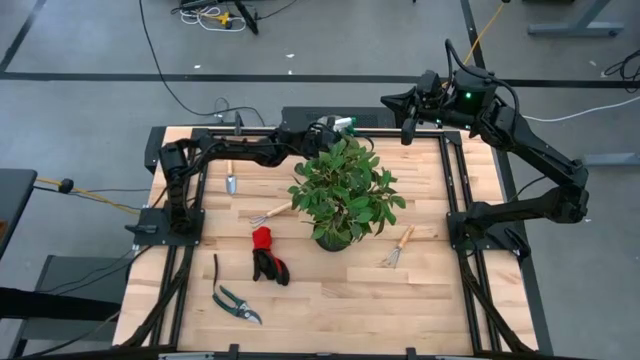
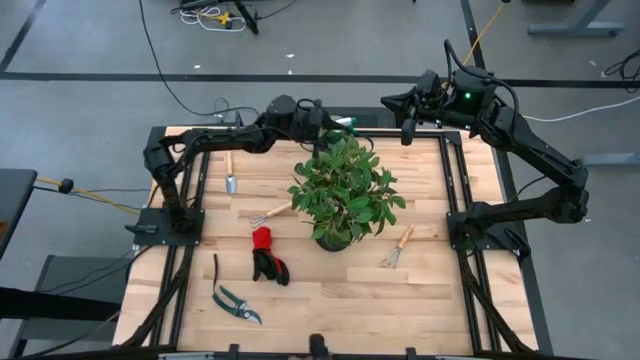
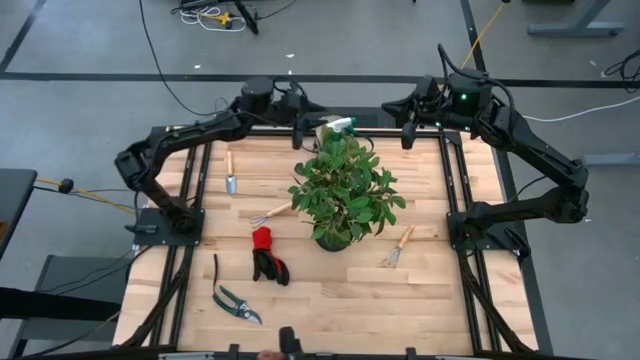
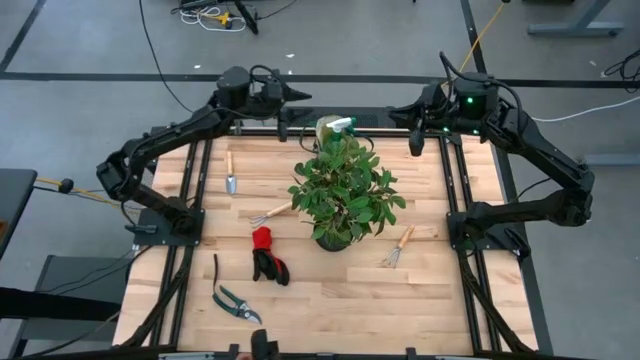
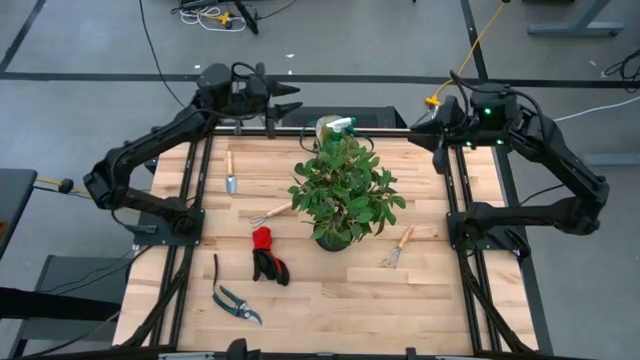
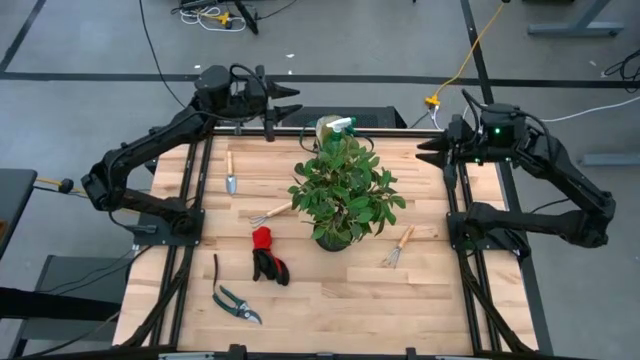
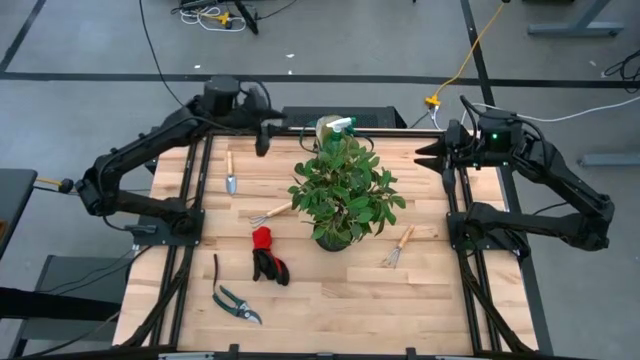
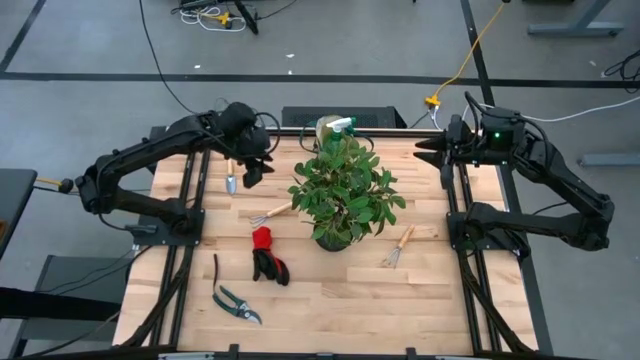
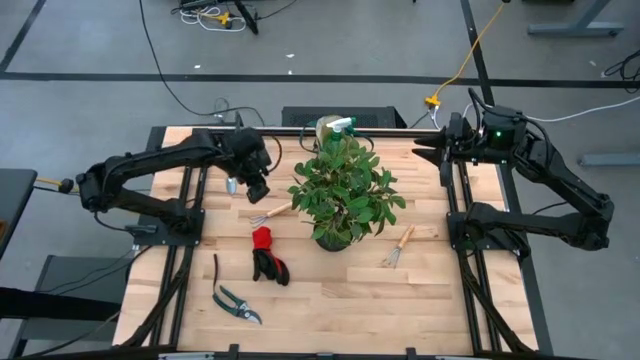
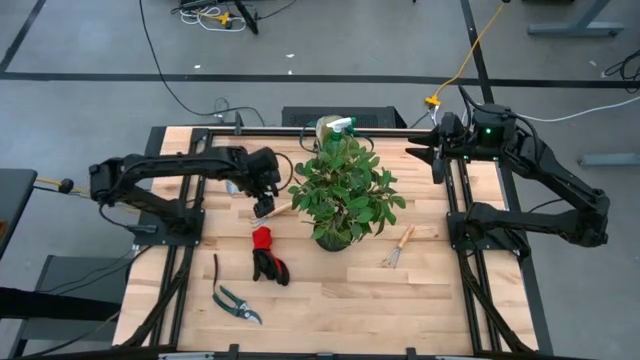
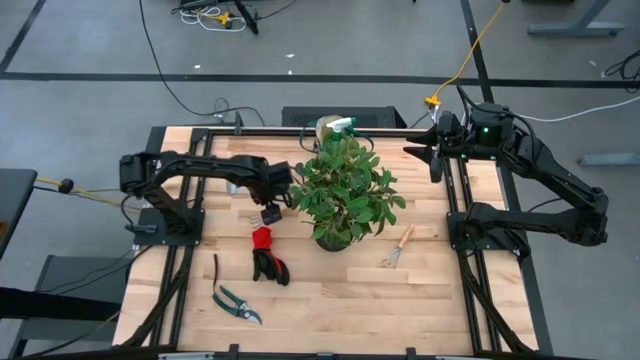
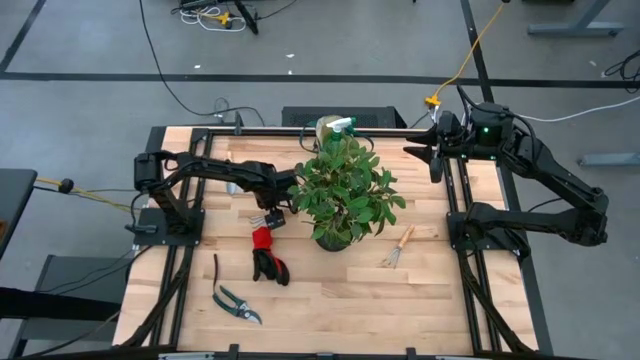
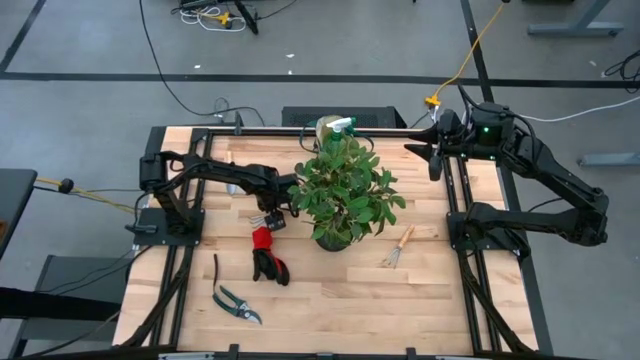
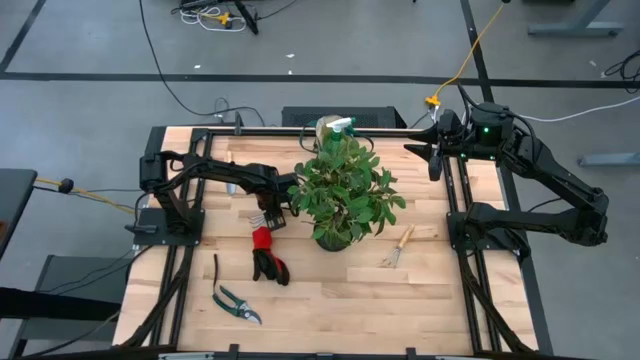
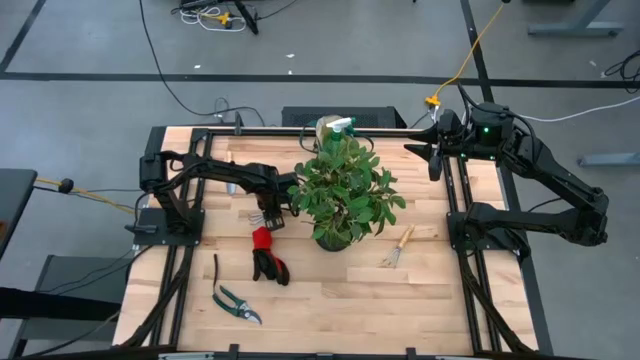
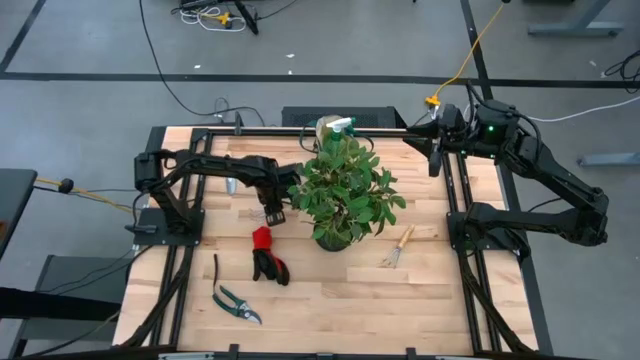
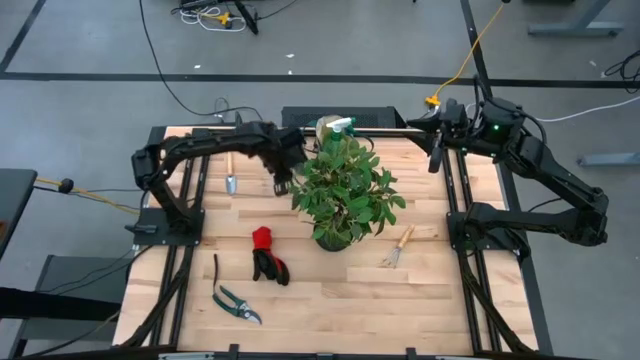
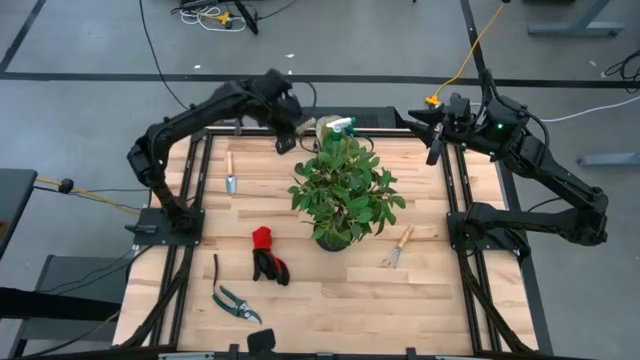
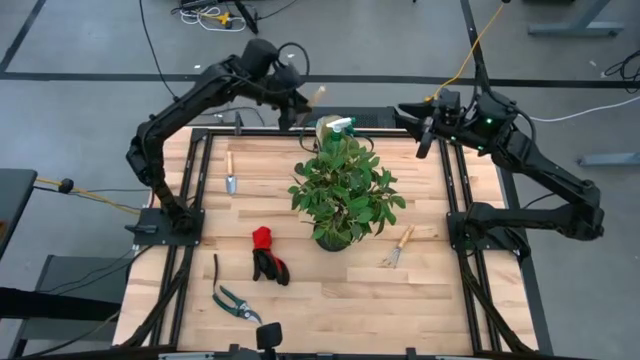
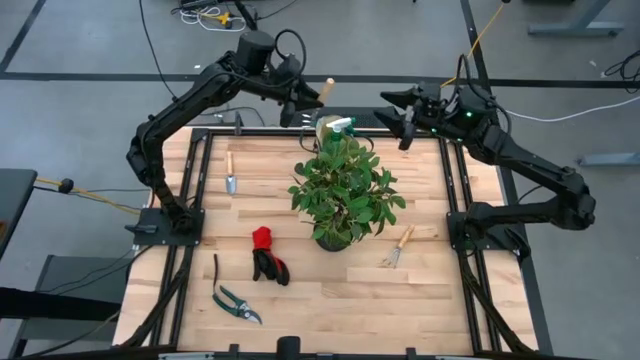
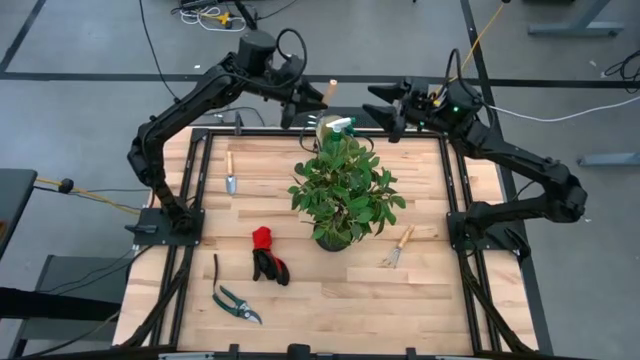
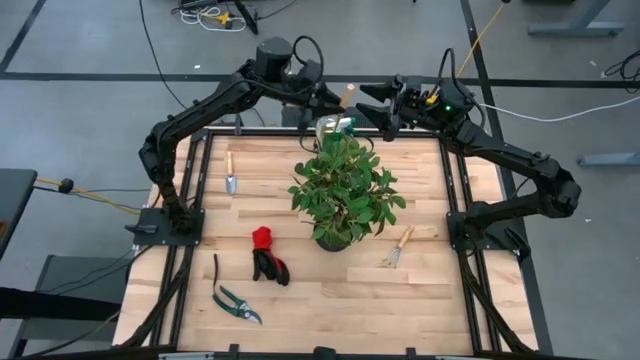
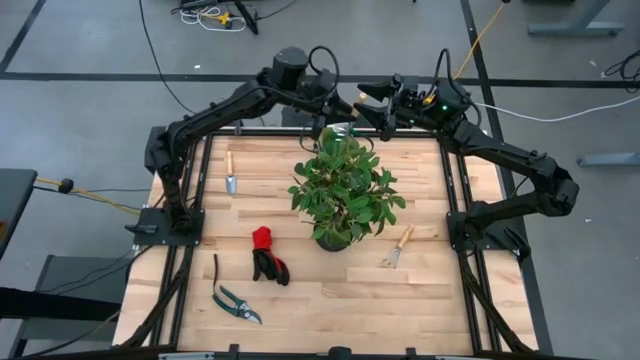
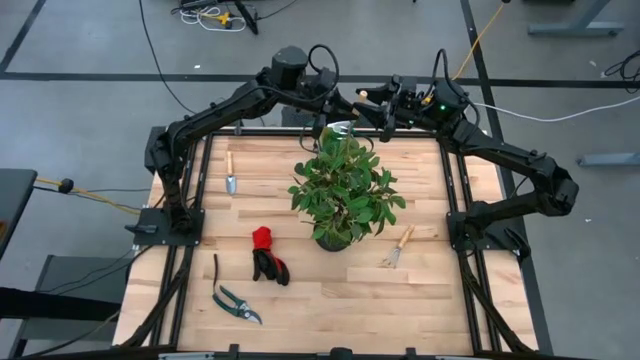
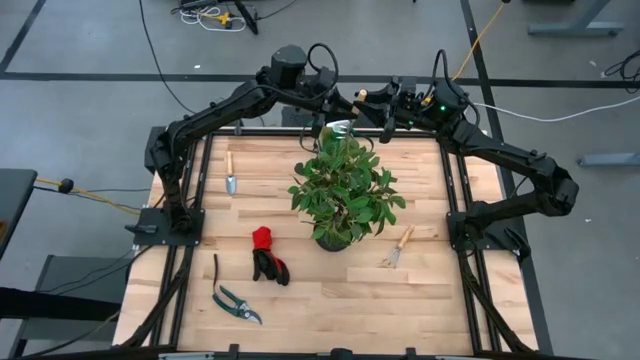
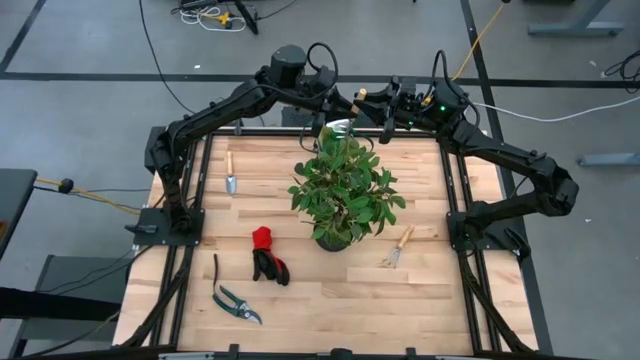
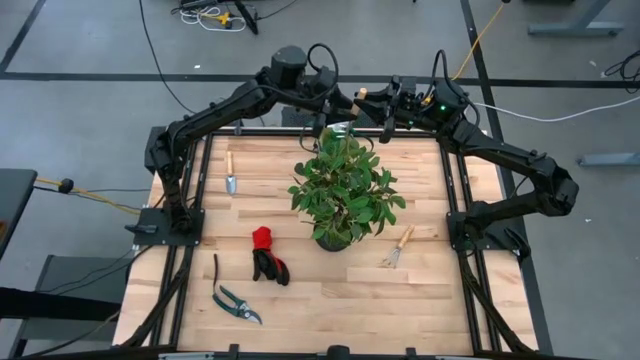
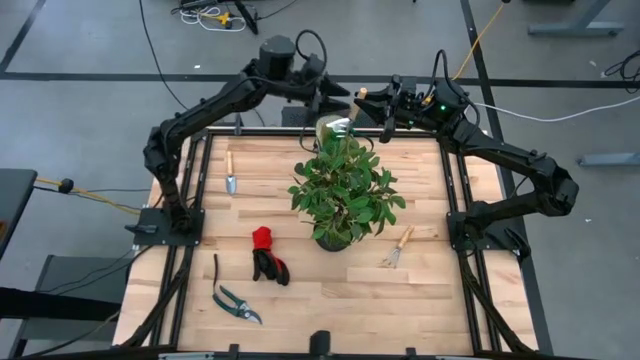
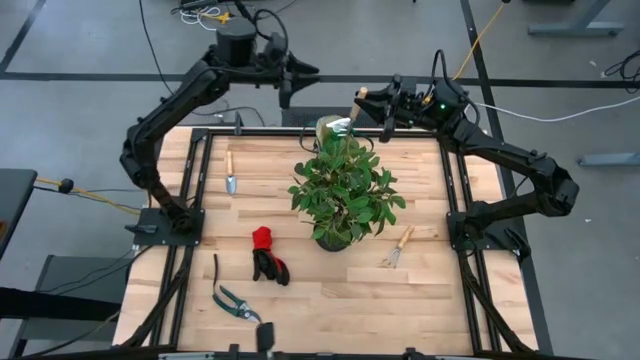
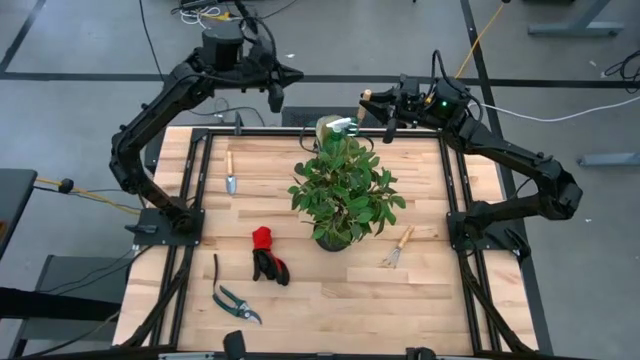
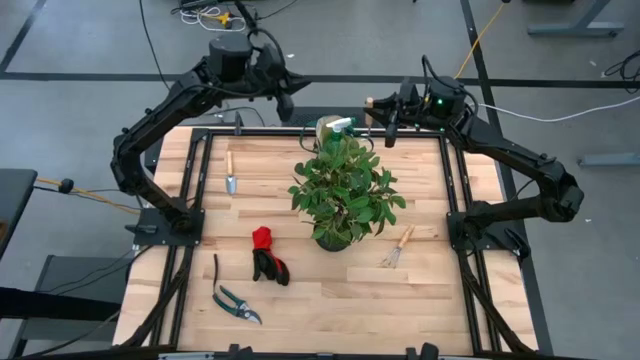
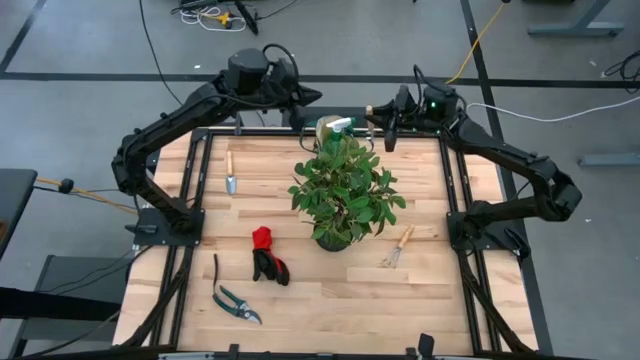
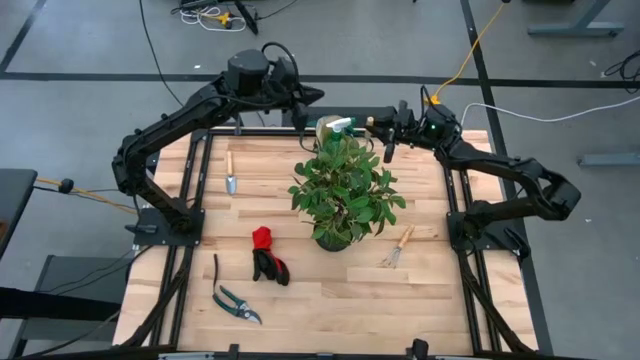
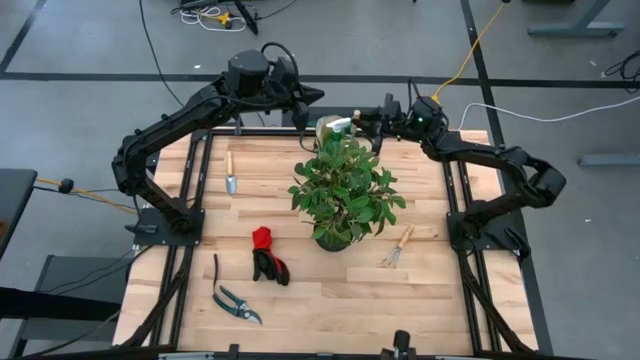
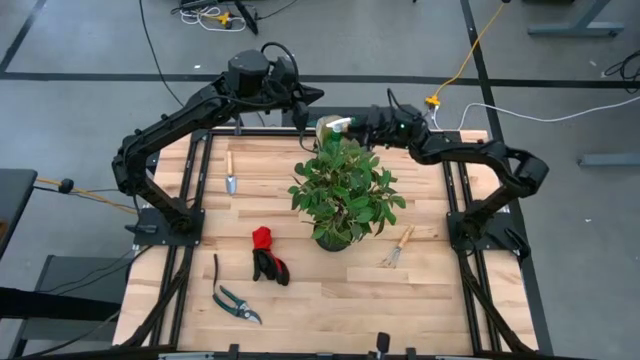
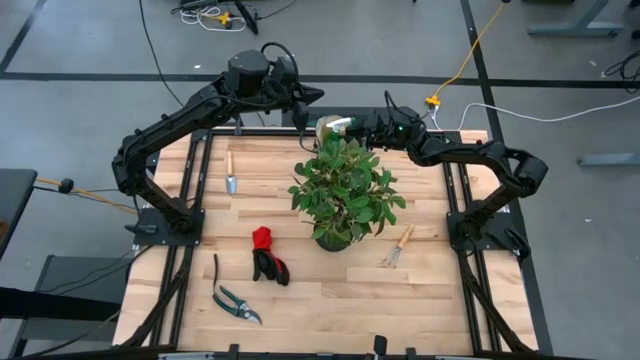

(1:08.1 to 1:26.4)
Task: Pick & Place Garden tools in Gardening bag
Put the brown hand rake into the gardening bag

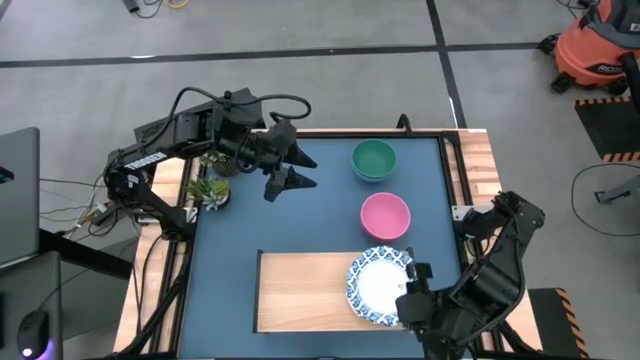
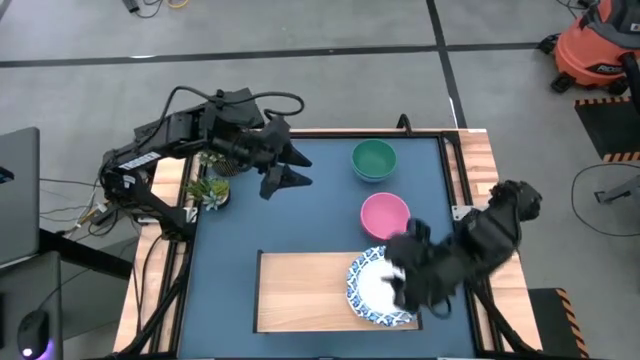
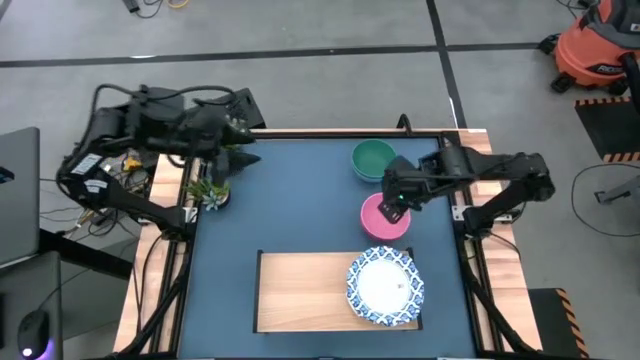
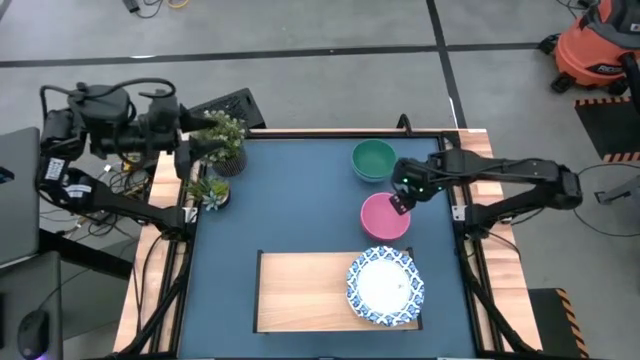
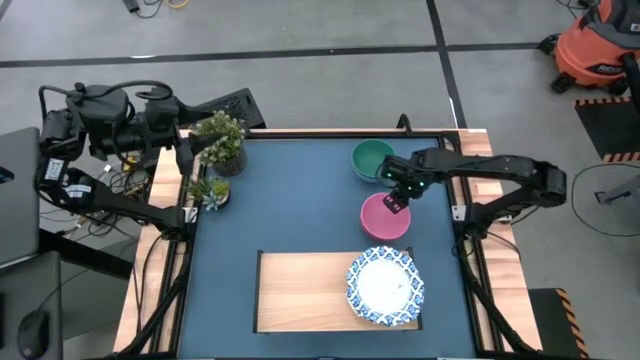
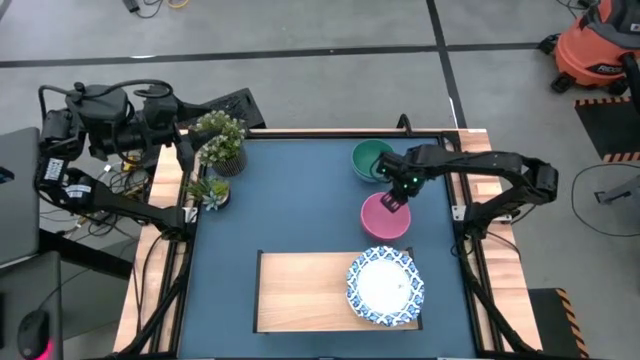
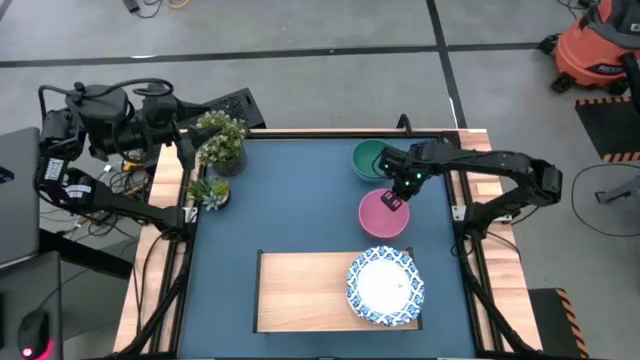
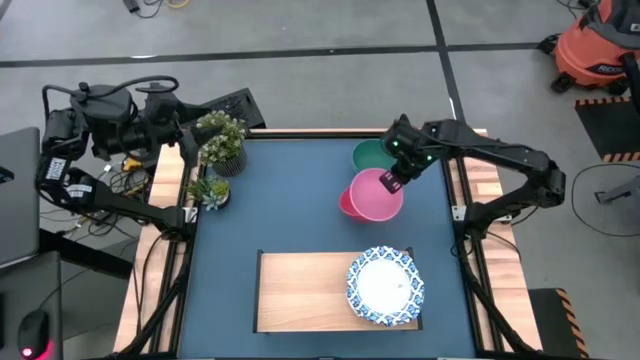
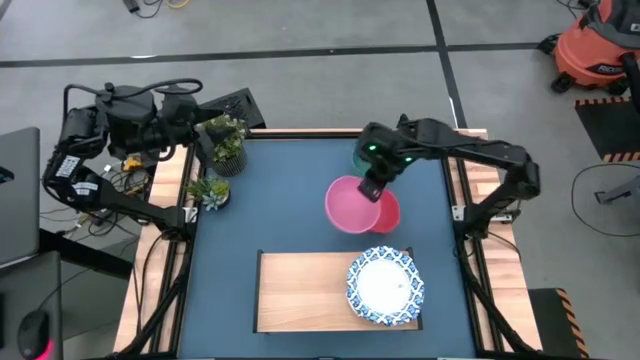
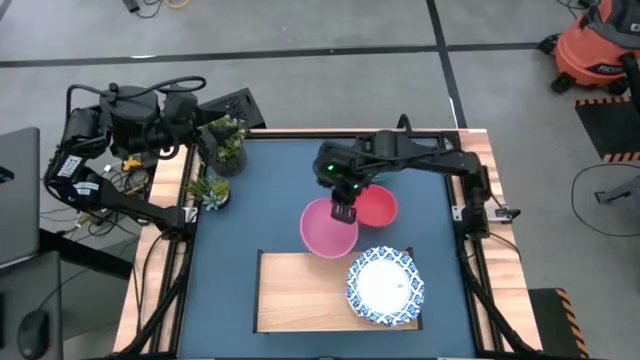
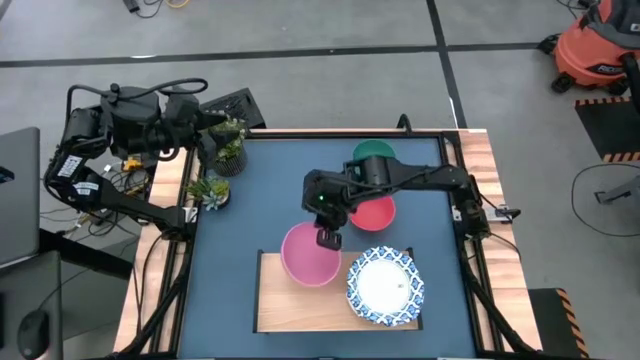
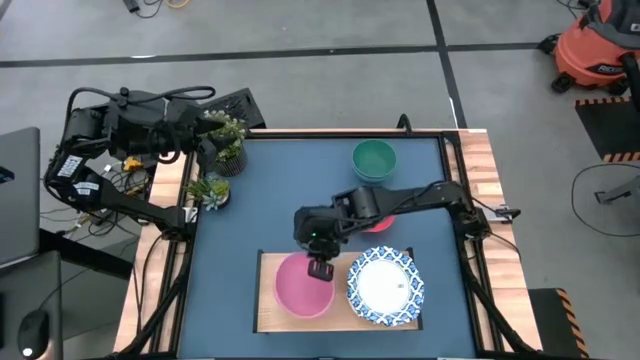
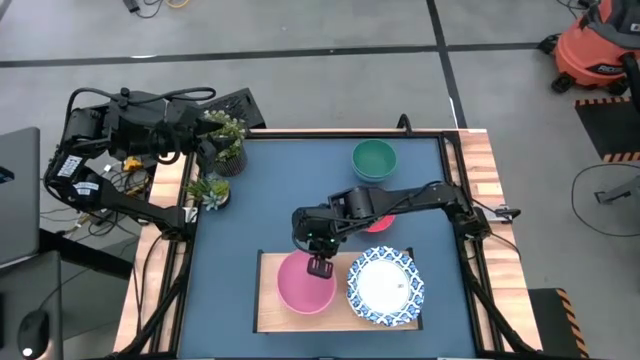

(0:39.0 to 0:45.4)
Task: Place and stack bowls onto a shelf
Put the pink bowl on the shelf
